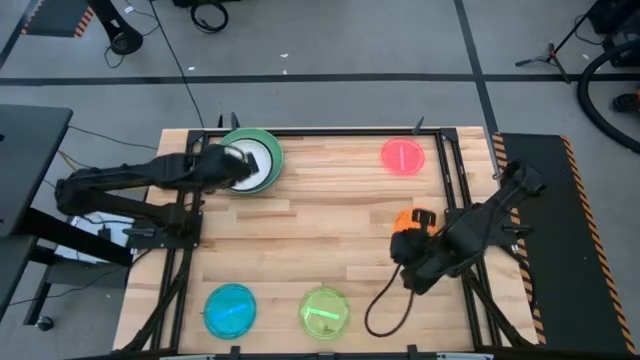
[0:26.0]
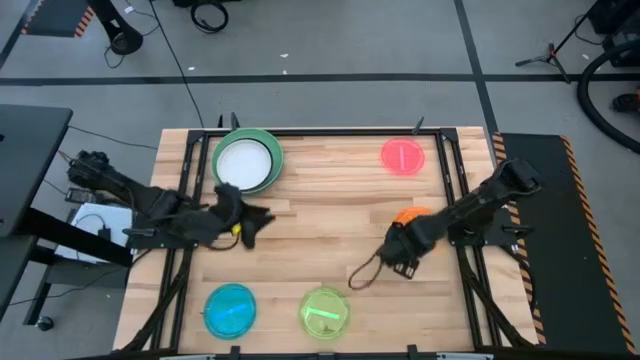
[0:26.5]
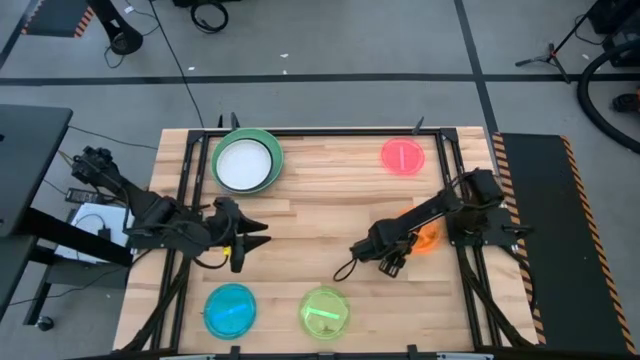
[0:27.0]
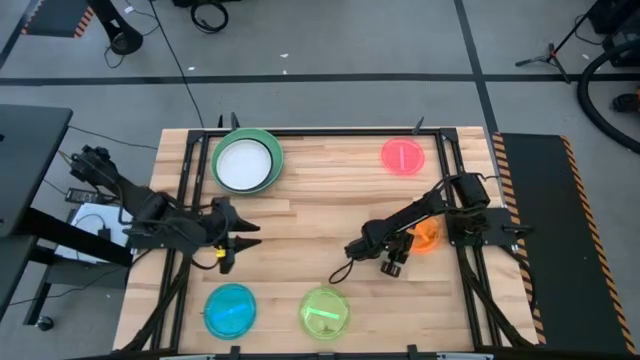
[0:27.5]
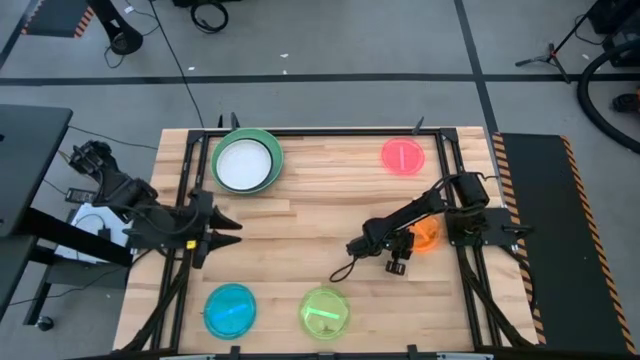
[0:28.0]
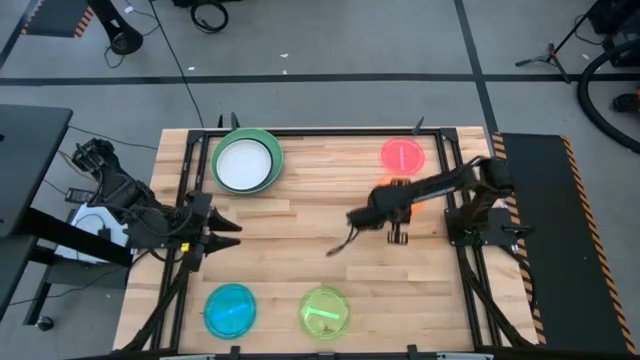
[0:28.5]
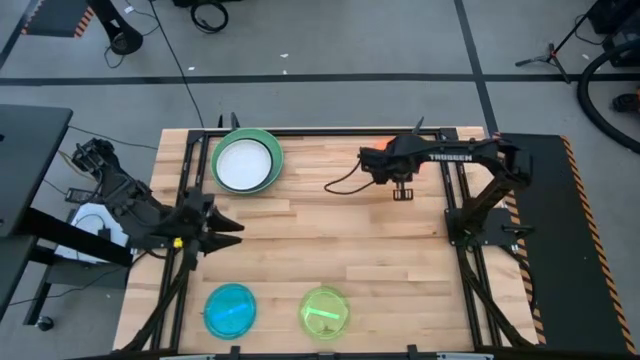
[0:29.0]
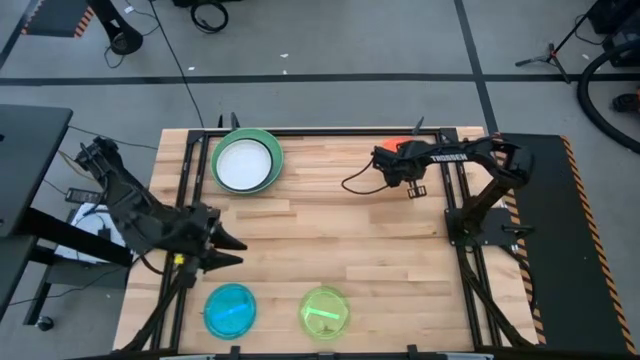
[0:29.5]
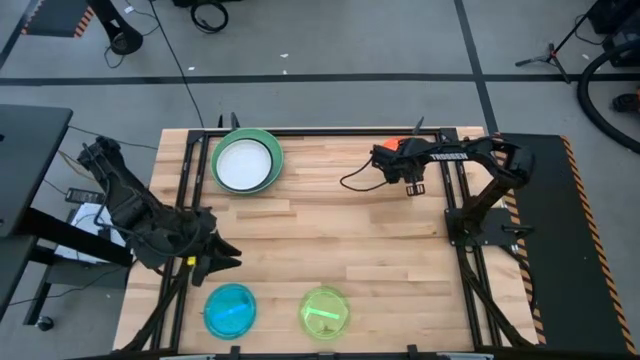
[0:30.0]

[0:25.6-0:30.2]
Task: Stack plastic plates
Stack the transparent orange plate on top of the transparent pink plate

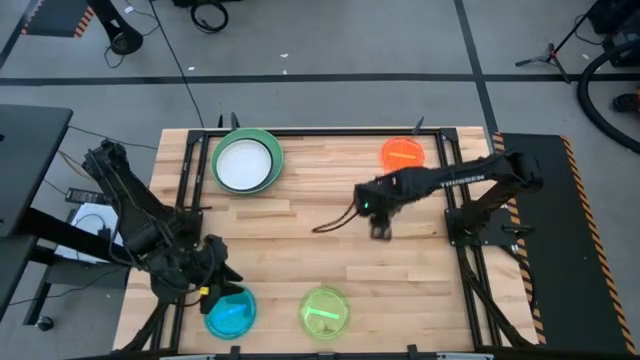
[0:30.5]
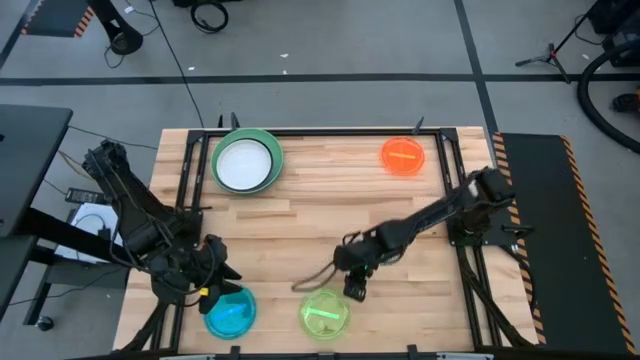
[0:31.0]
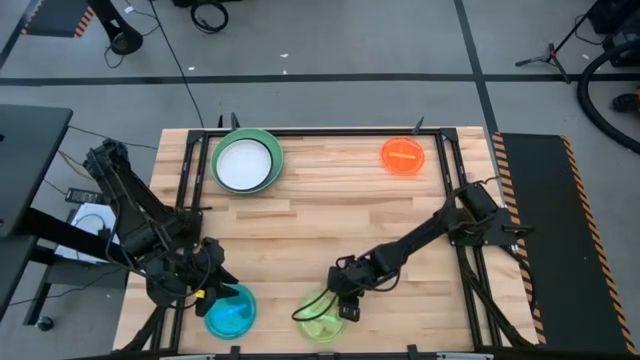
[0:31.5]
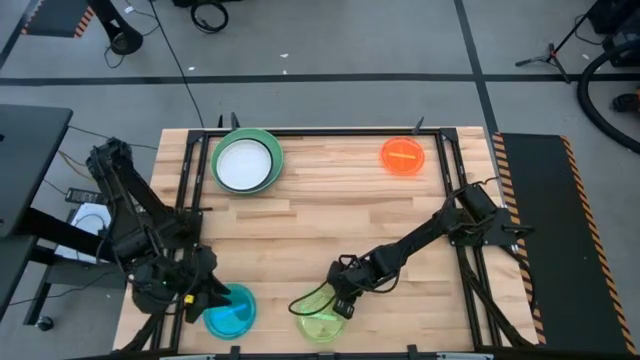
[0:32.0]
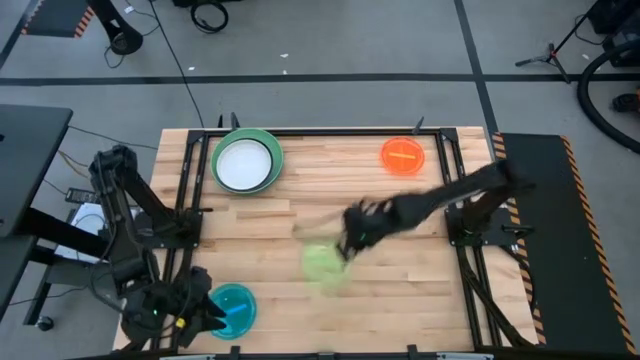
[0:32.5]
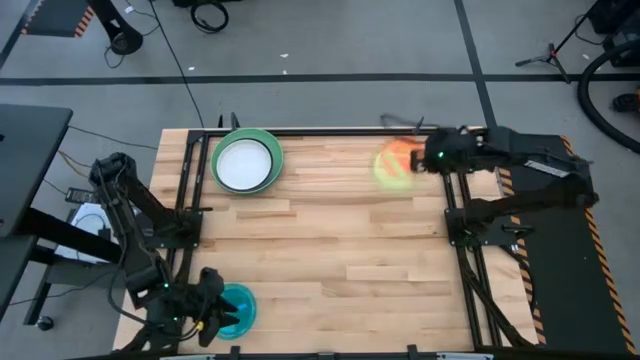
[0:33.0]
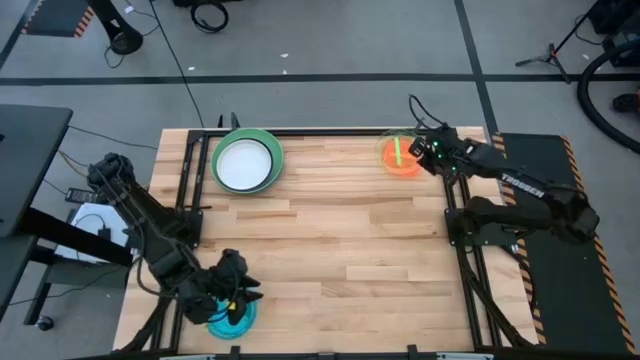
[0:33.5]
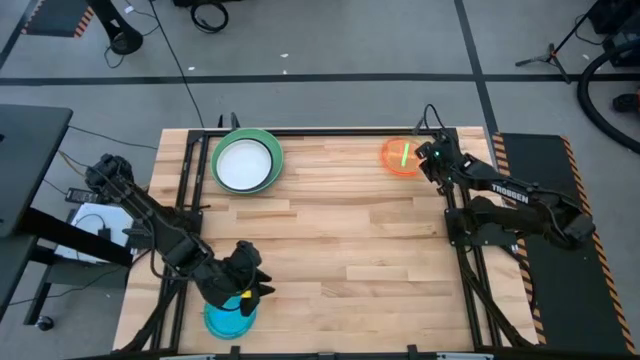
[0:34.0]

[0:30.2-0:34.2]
Stack the transparent green plate on top of the transparent orange plate

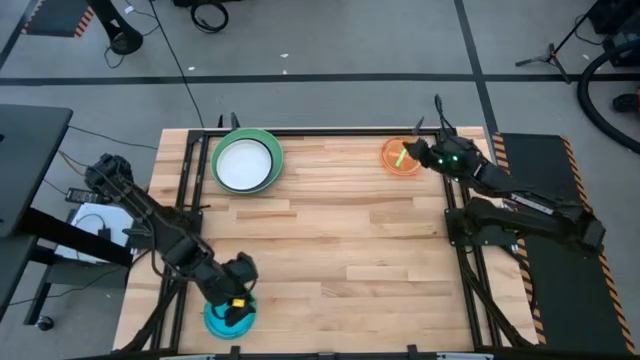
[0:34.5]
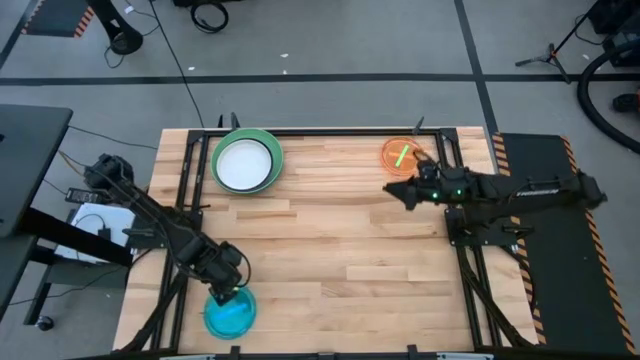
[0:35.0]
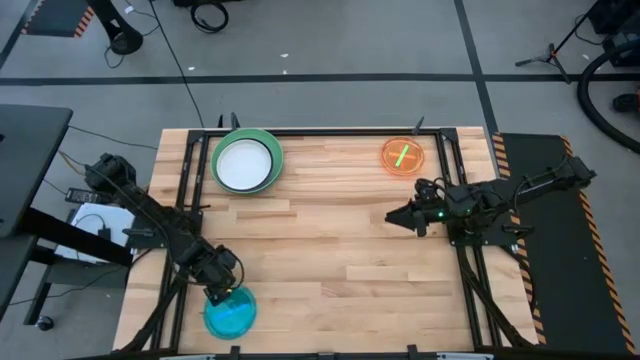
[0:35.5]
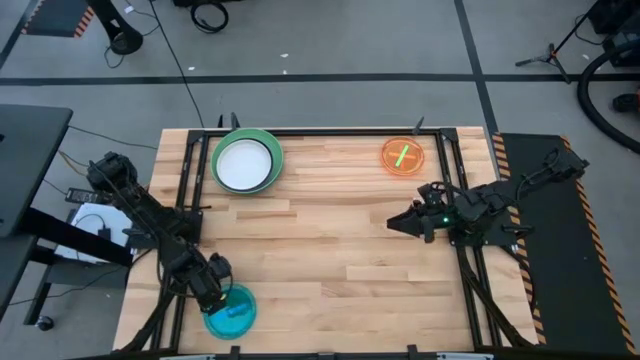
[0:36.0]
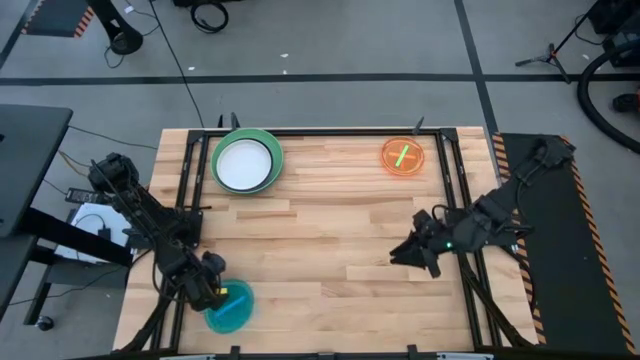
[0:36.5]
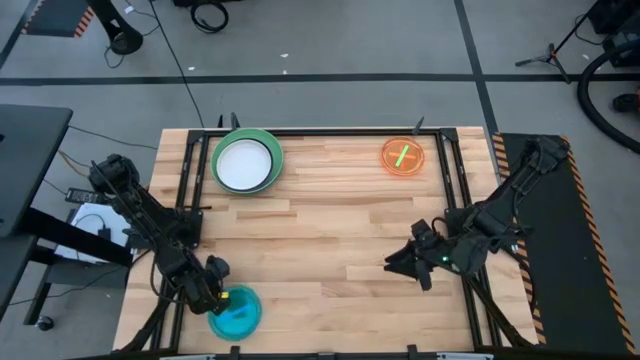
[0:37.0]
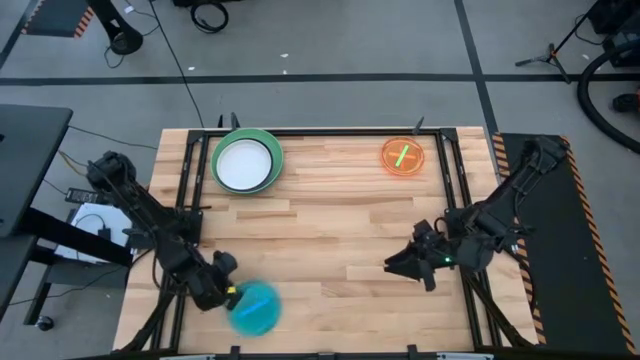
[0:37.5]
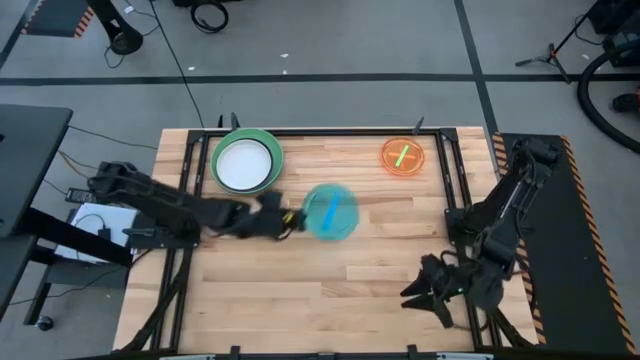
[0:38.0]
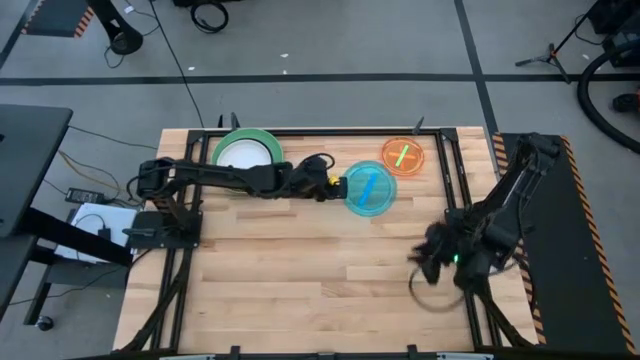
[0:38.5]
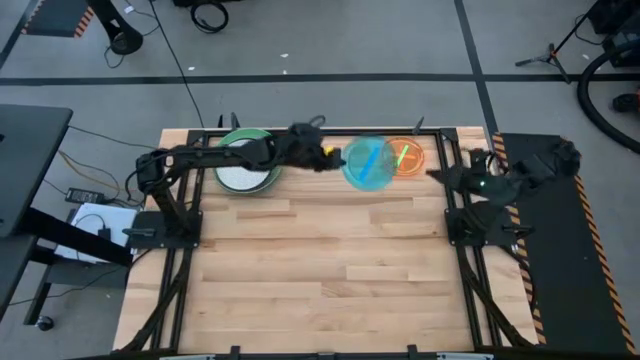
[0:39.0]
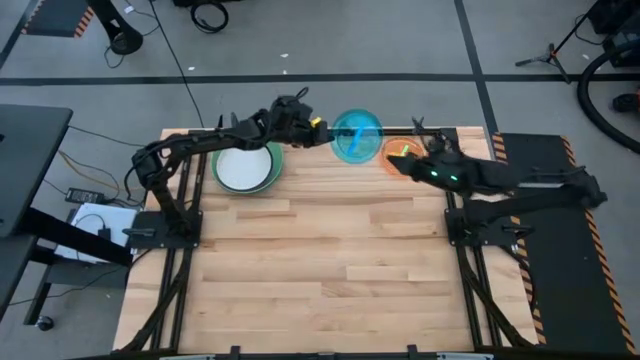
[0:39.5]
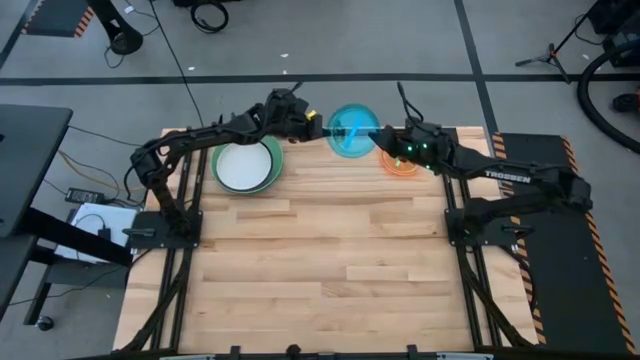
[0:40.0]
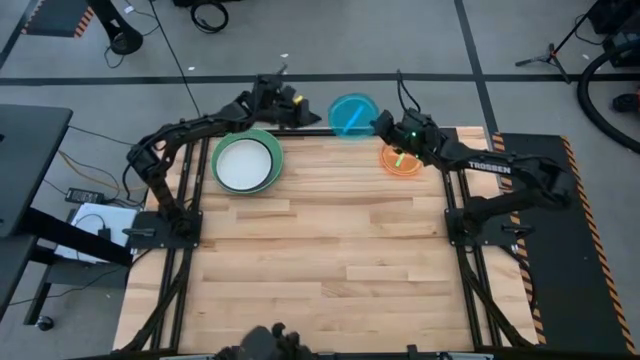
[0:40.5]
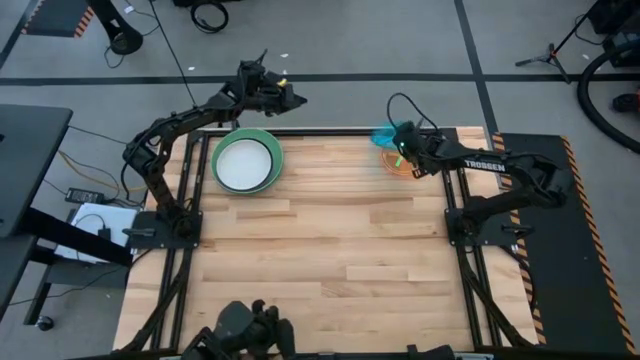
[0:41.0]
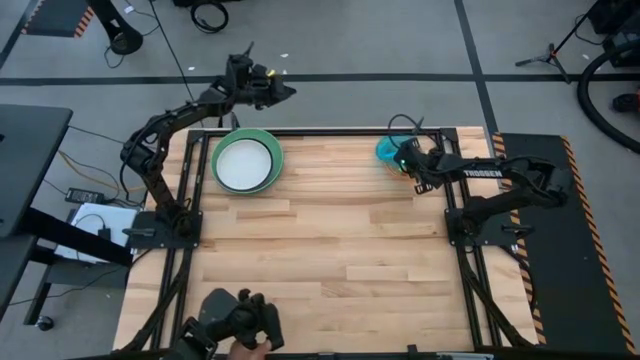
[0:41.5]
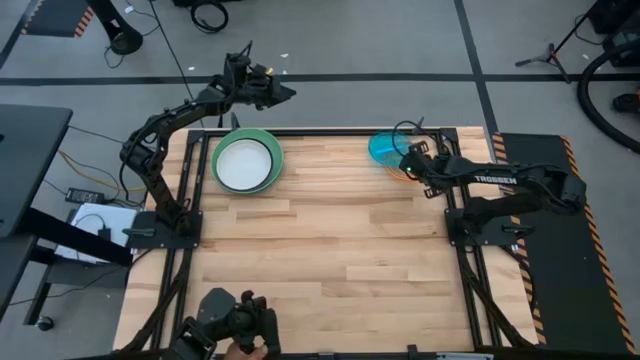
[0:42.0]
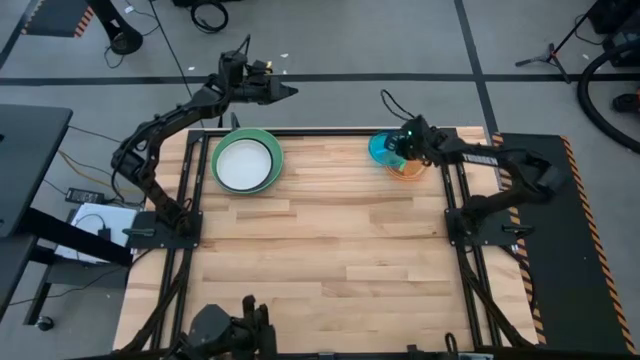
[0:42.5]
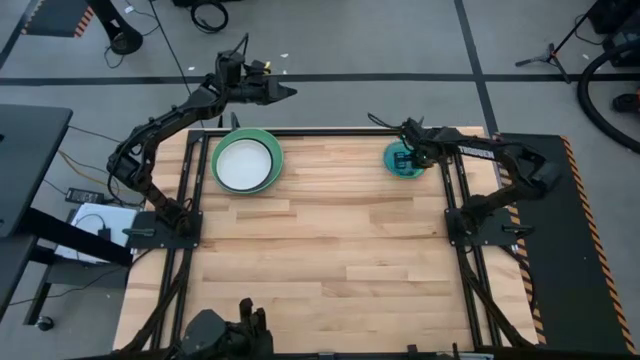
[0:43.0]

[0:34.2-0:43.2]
Stack the transparent blue plate on top of the transparent green plate

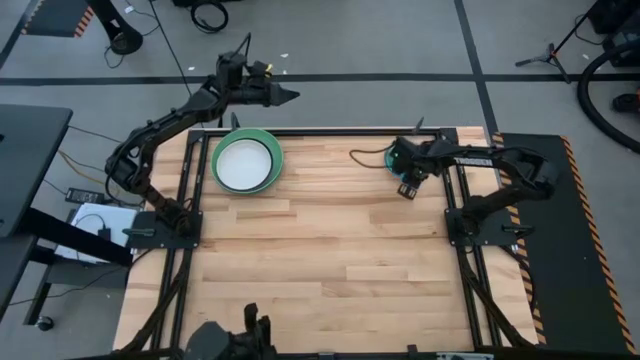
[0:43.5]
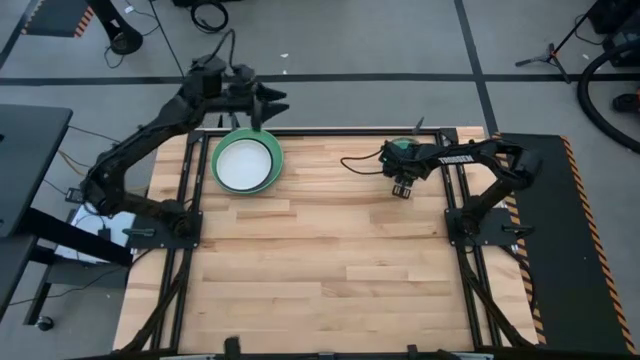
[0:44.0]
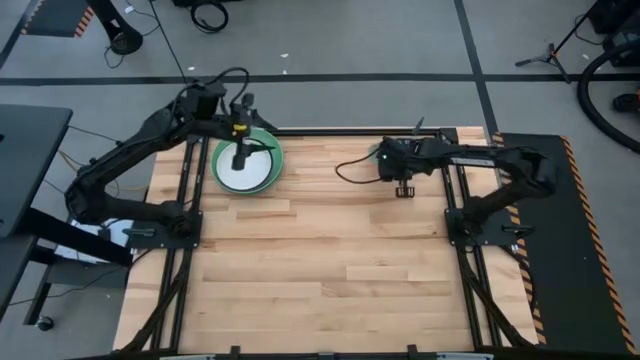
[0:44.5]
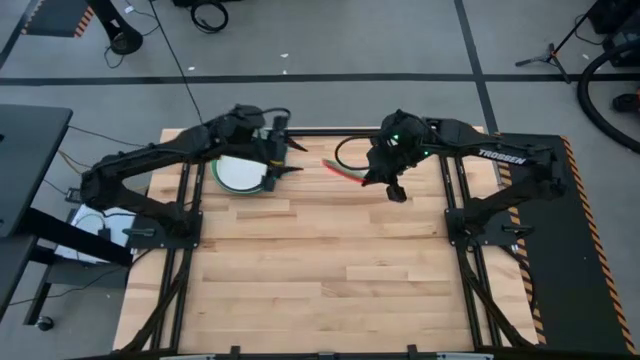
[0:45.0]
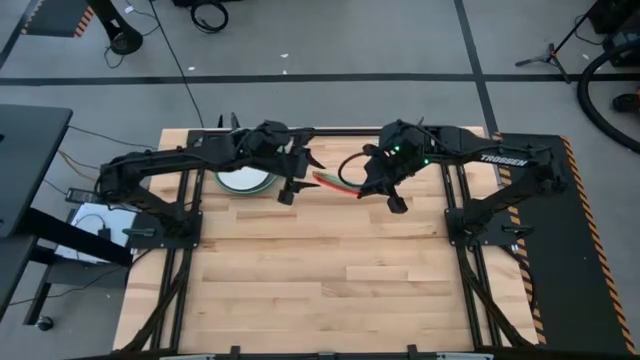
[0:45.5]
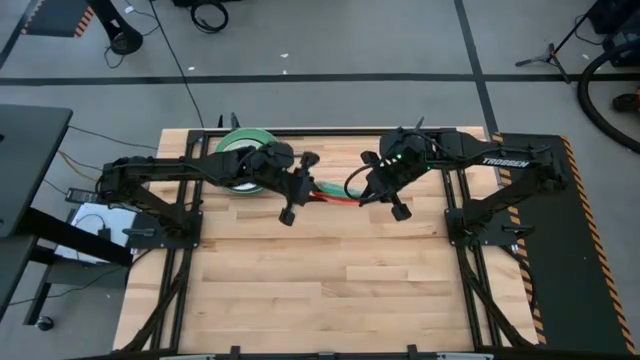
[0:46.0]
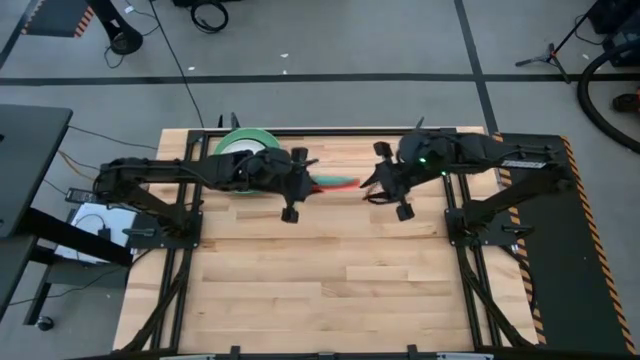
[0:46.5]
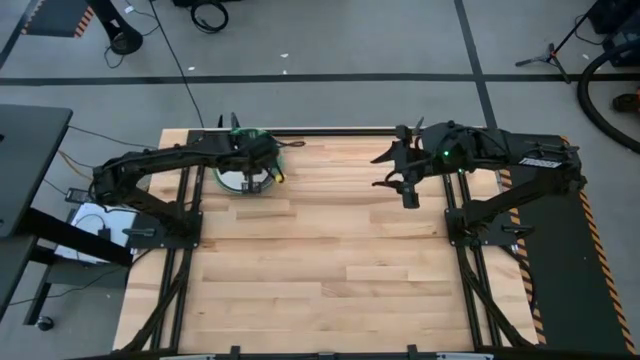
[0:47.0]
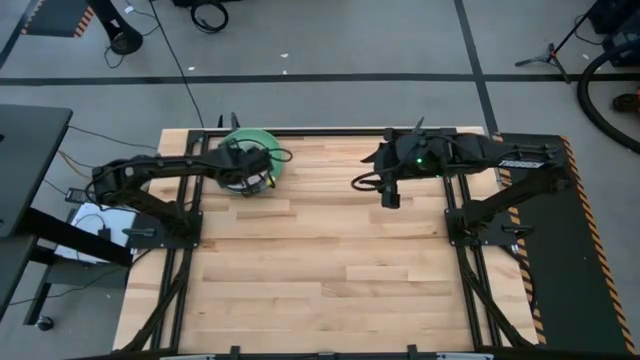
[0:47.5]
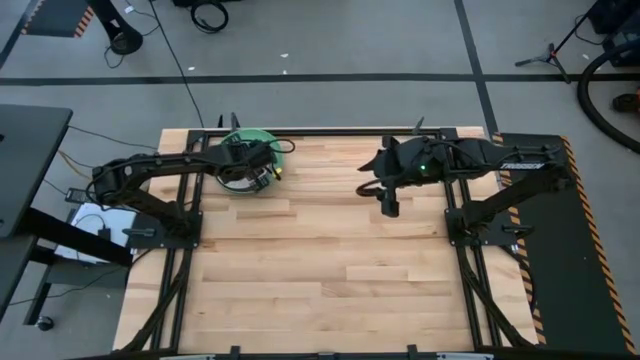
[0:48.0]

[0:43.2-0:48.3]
Stack the stacked transparent plates on top of the white plate

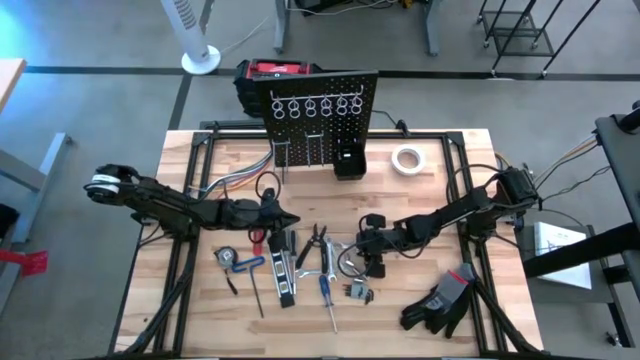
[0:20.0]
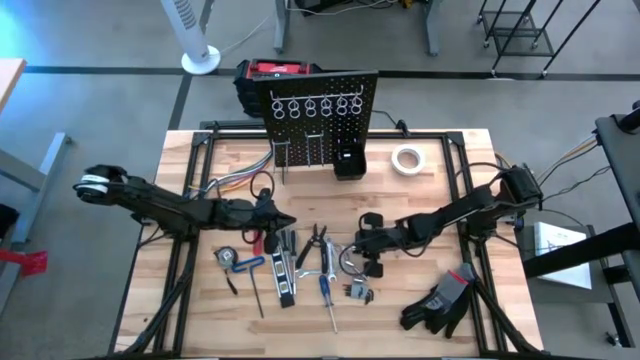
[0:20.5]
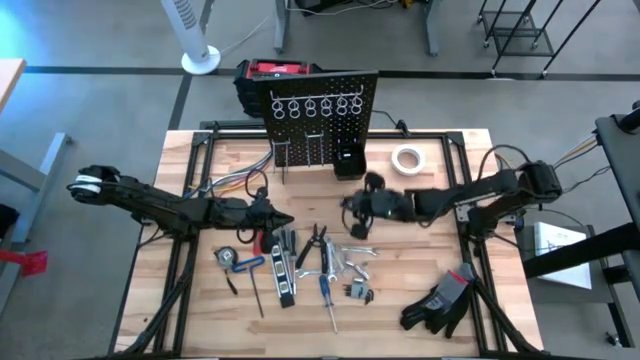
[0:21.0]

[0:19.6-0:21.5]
Task: Hang tools onto peg board
Put the socket into the black tool bin on the peg board
